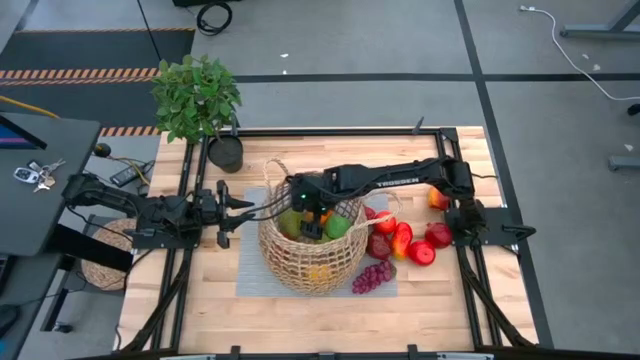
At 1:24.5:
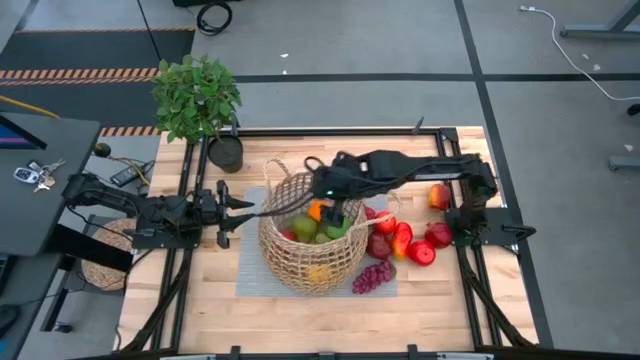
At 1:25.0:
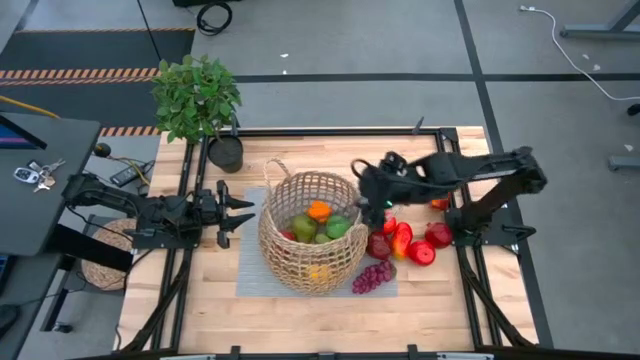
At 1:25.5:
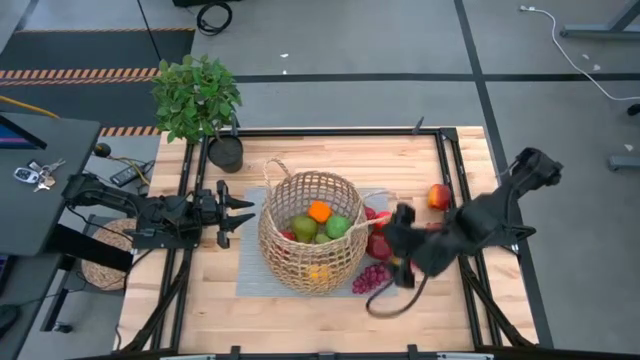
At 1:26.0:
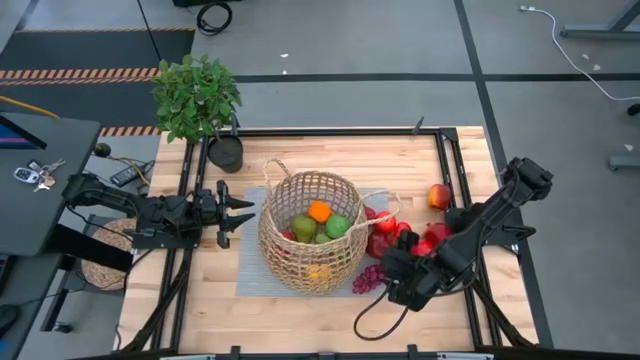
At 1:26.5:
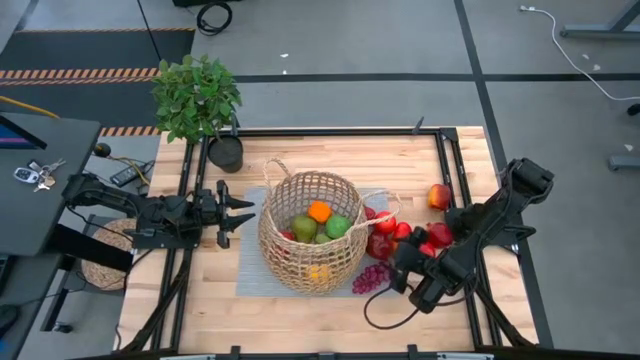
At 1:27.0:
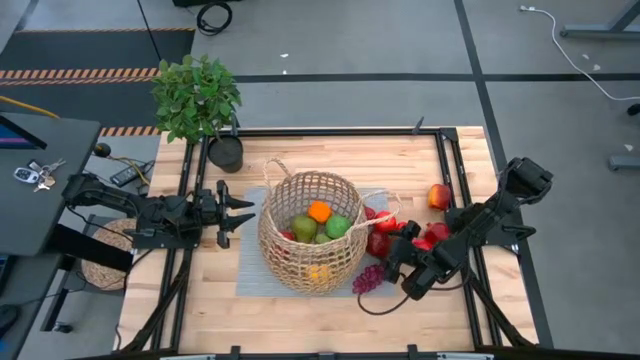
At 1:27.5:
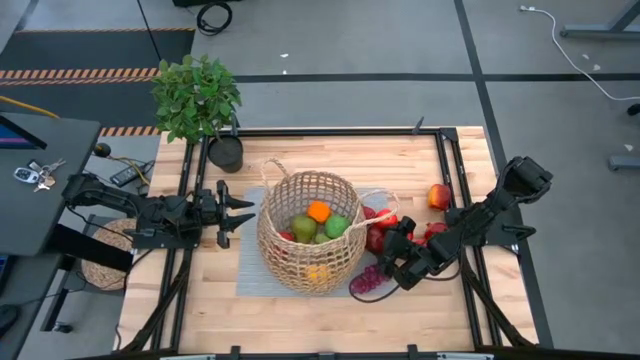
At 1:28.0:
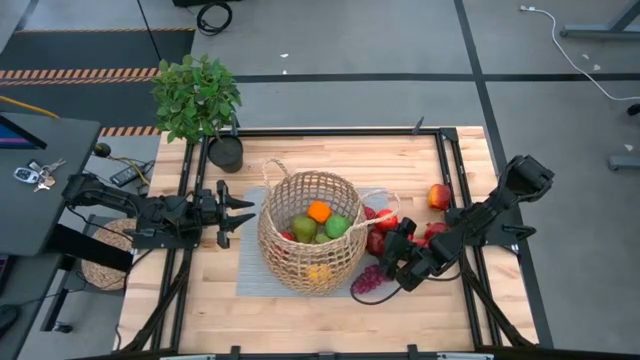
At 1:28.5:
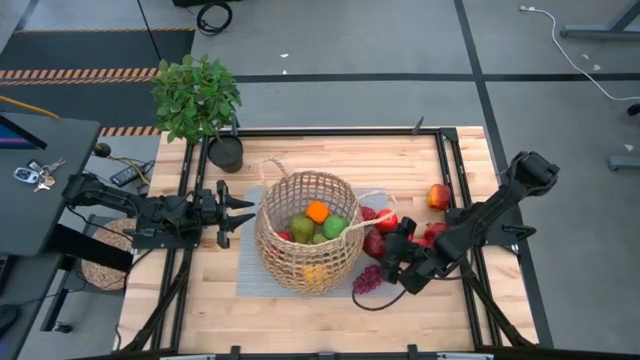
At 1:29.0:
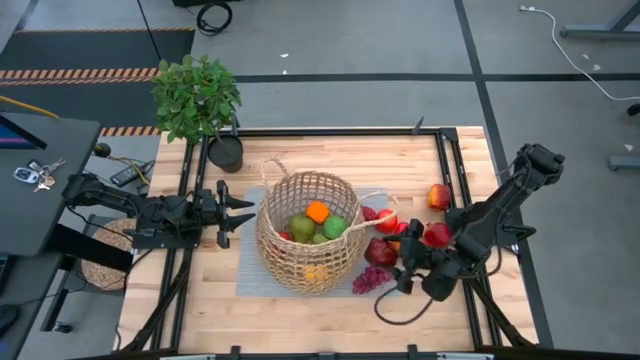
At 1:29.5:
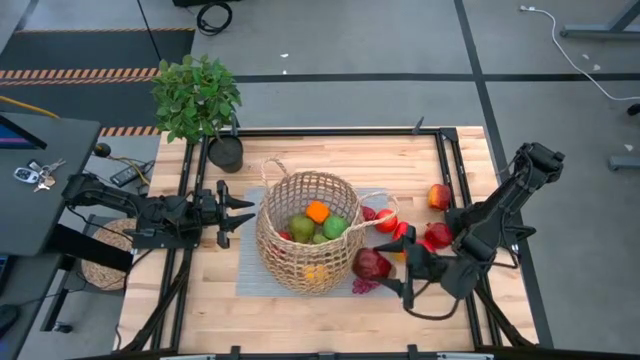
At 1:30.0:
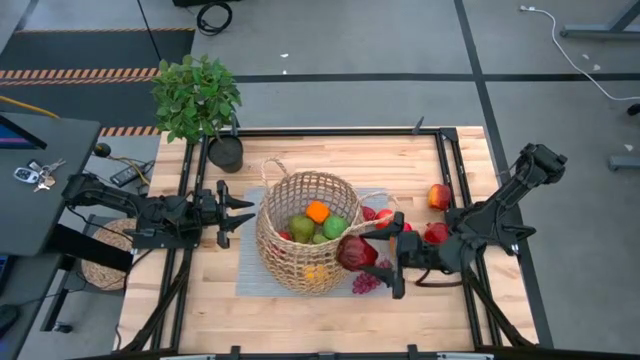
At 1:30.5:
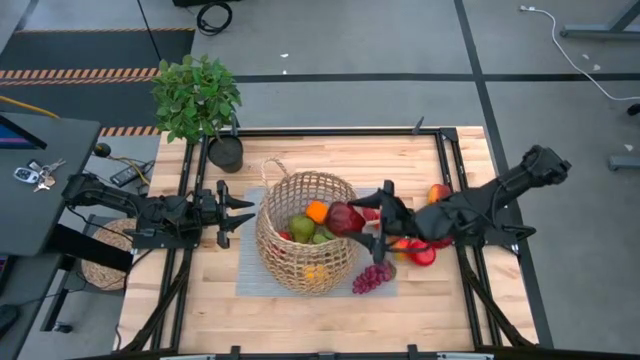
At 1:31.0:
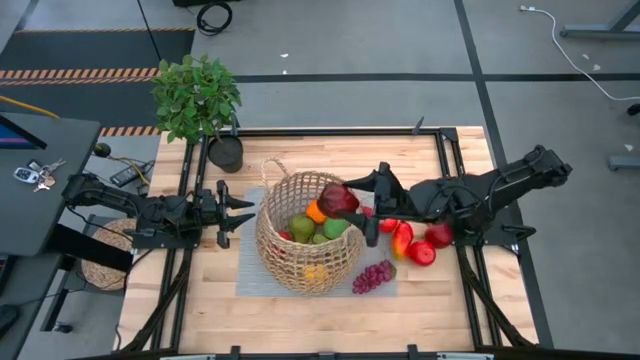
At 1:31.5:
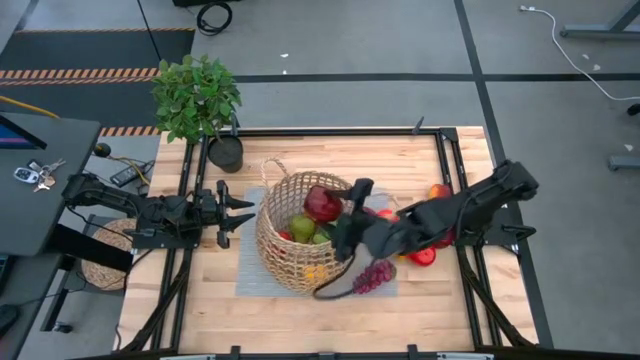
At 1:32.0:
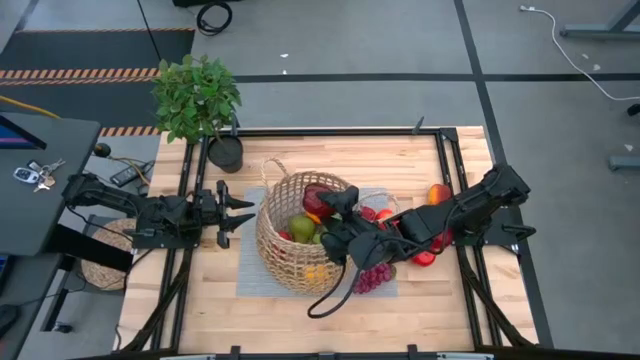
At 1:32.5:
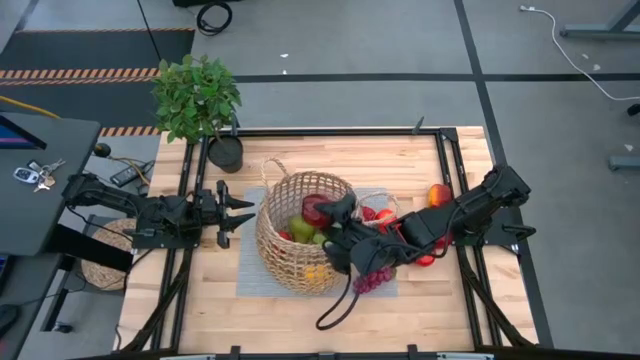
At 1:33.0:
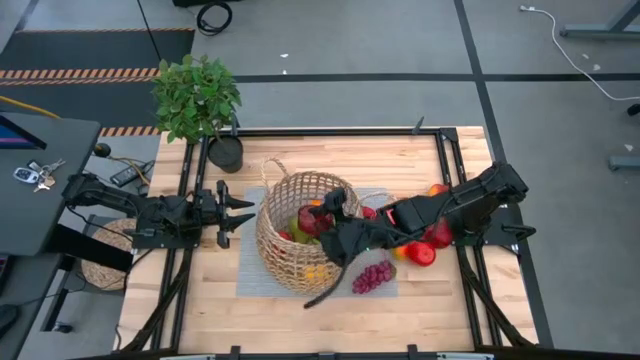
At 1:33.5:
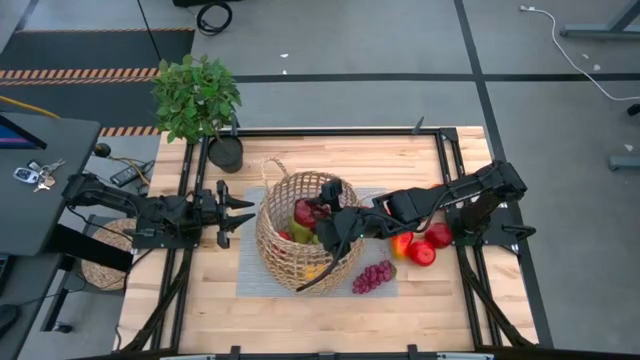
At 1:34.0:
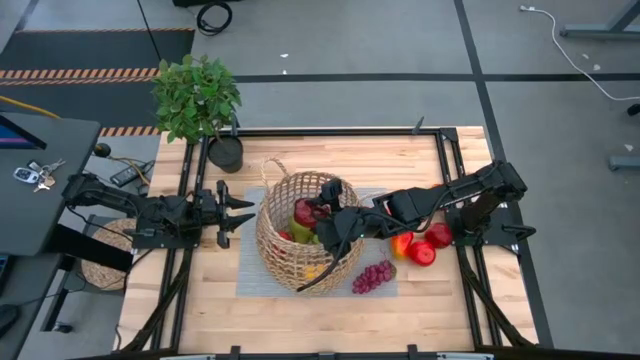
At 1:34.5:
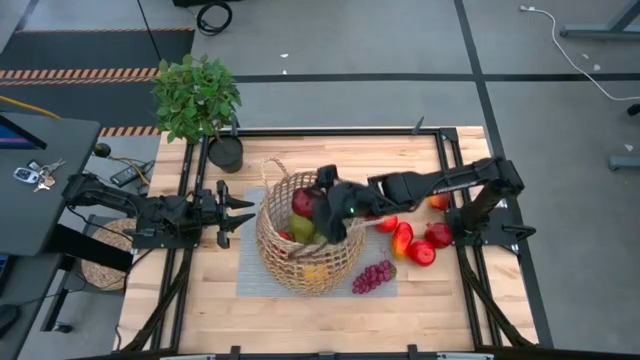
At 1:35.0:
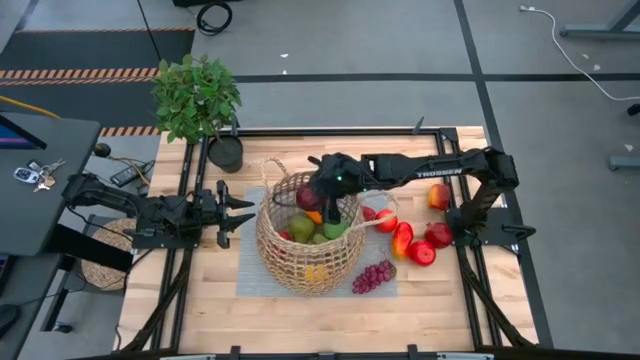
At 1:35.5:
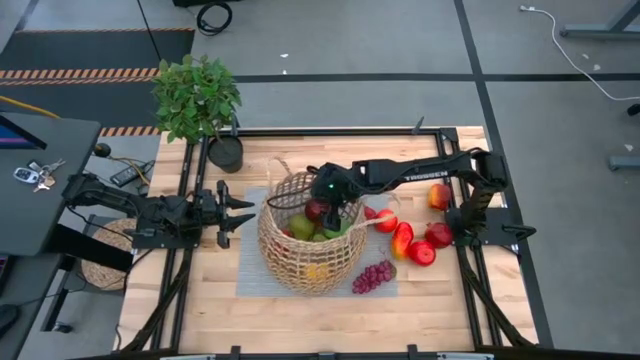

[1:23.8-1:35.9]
Task: Build produce basket
Put the bottom dark red apple into the basket

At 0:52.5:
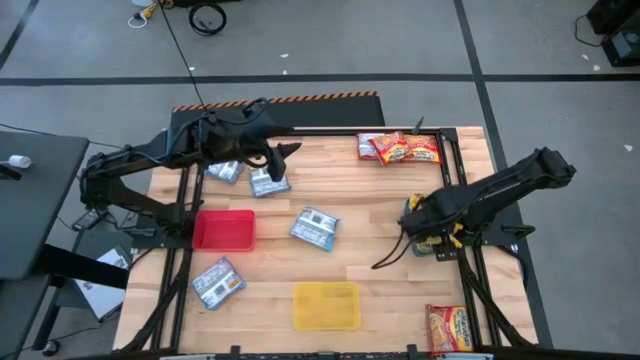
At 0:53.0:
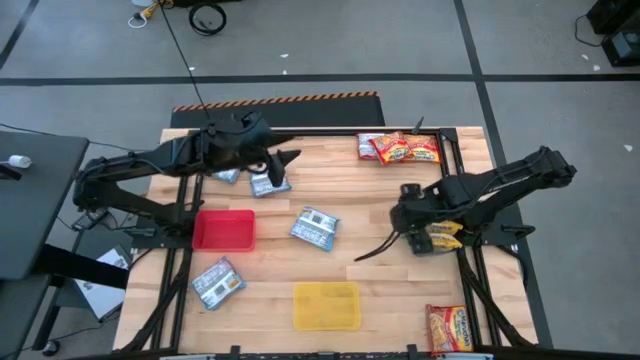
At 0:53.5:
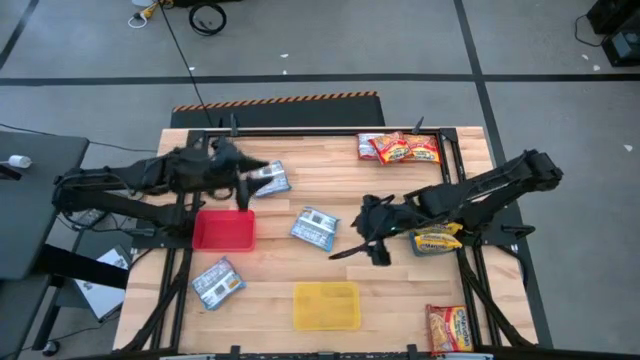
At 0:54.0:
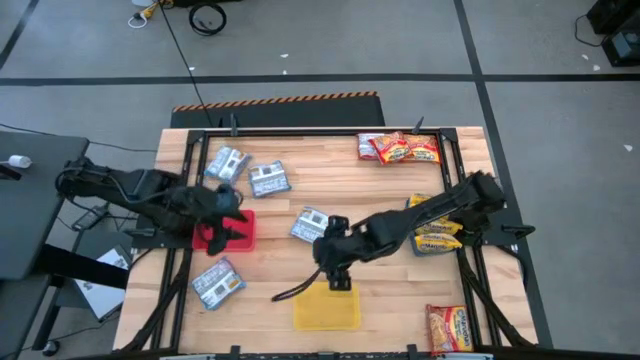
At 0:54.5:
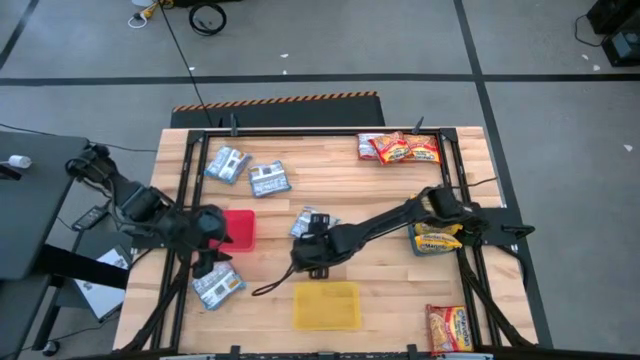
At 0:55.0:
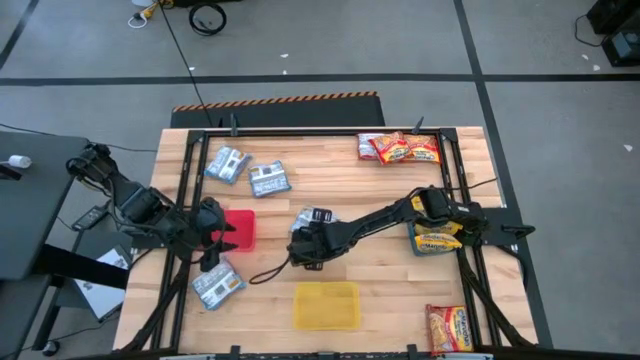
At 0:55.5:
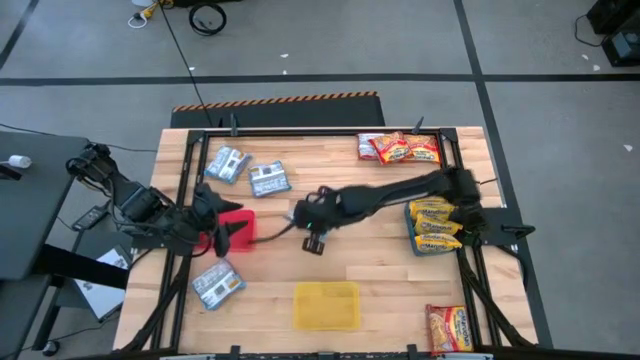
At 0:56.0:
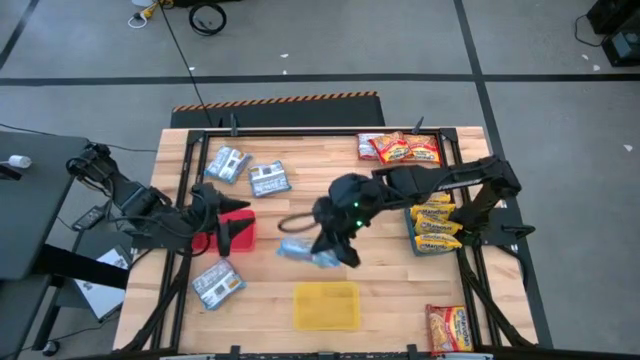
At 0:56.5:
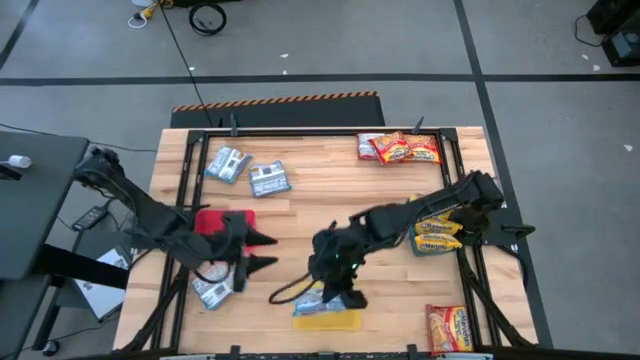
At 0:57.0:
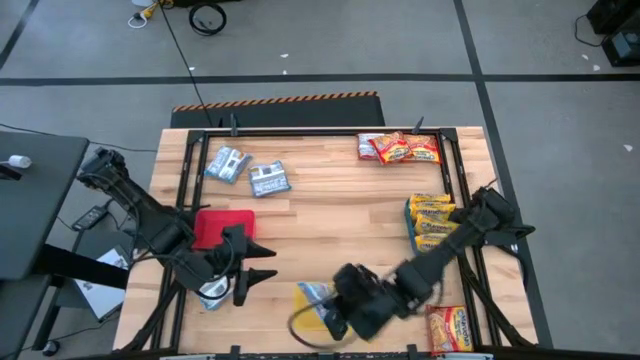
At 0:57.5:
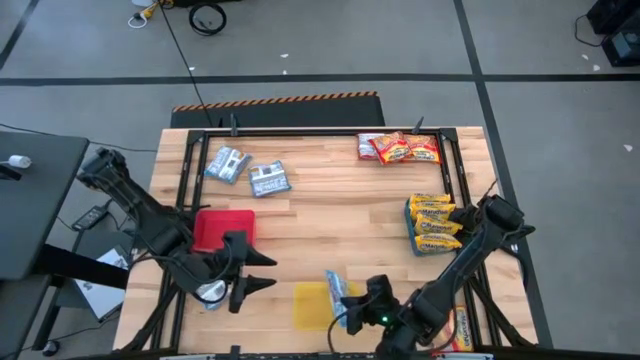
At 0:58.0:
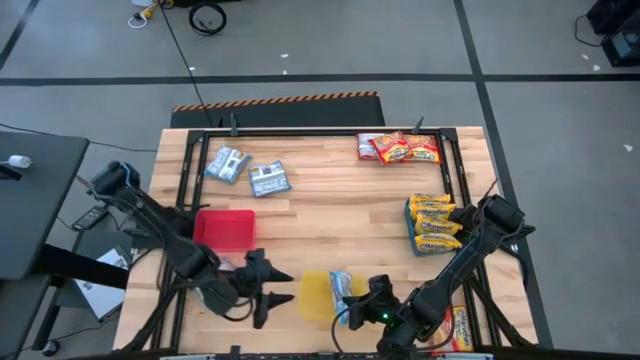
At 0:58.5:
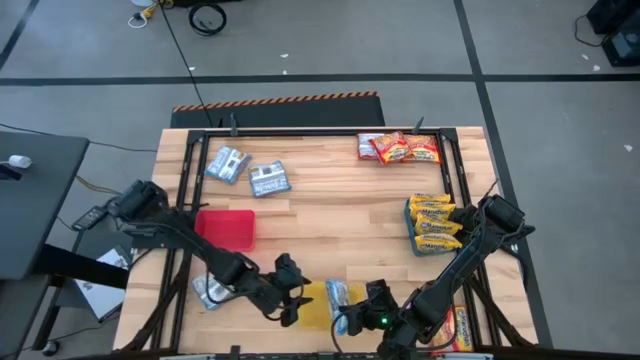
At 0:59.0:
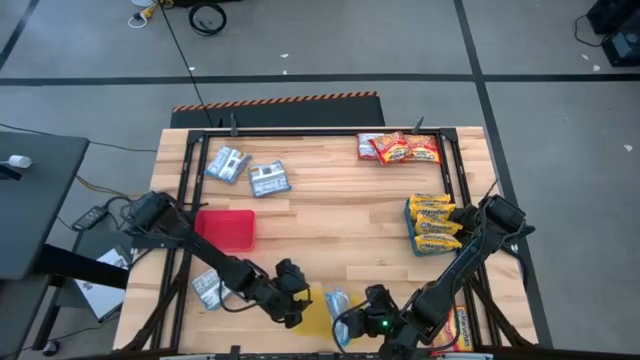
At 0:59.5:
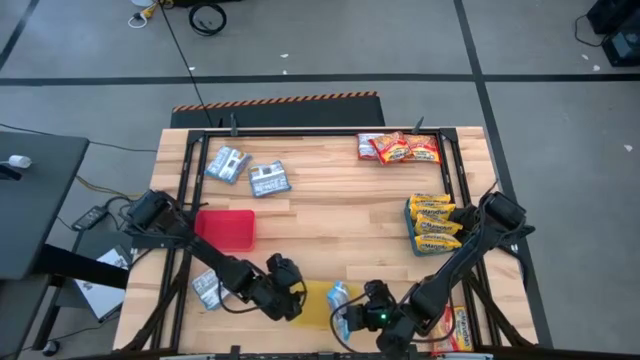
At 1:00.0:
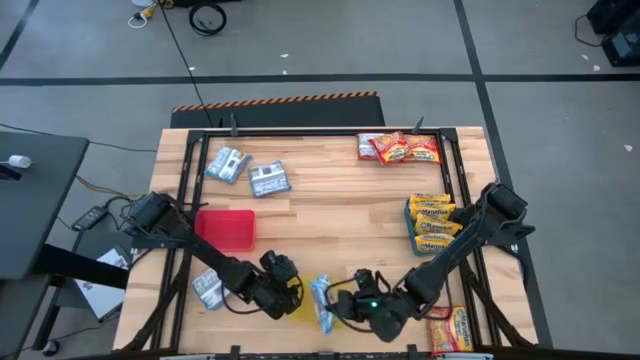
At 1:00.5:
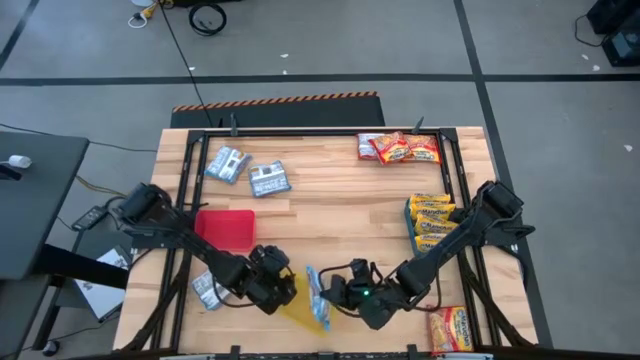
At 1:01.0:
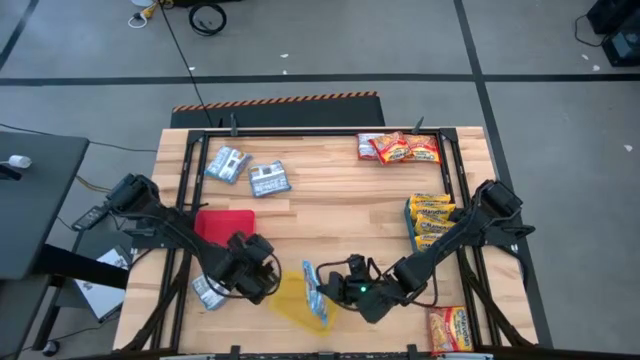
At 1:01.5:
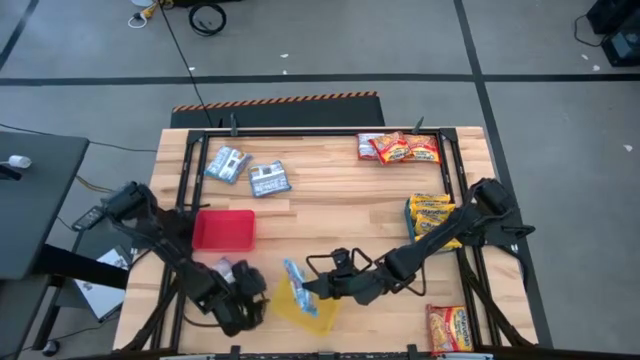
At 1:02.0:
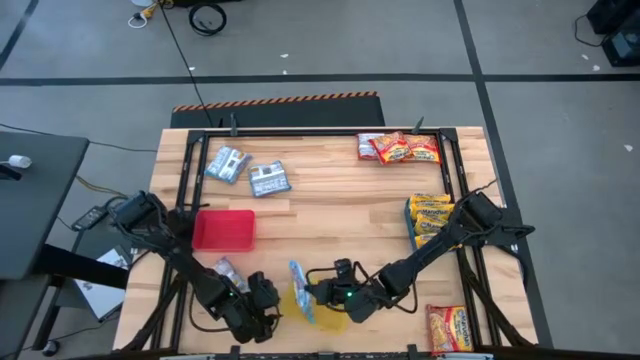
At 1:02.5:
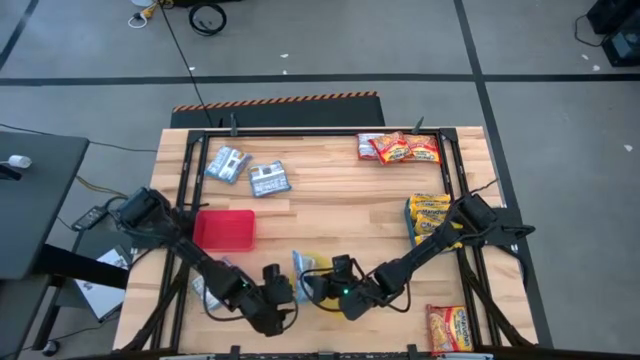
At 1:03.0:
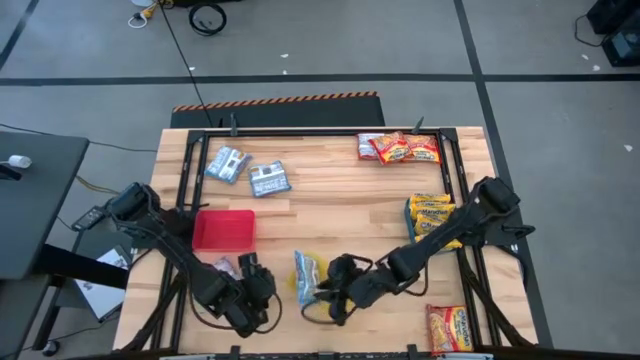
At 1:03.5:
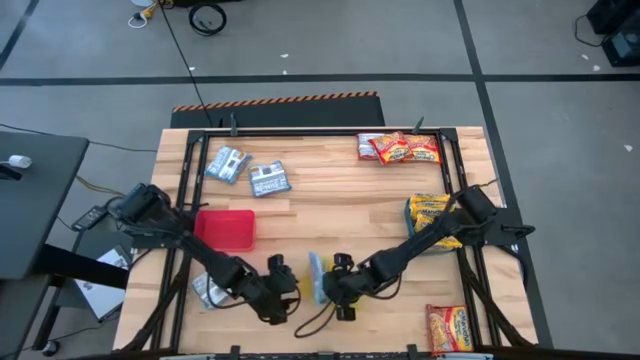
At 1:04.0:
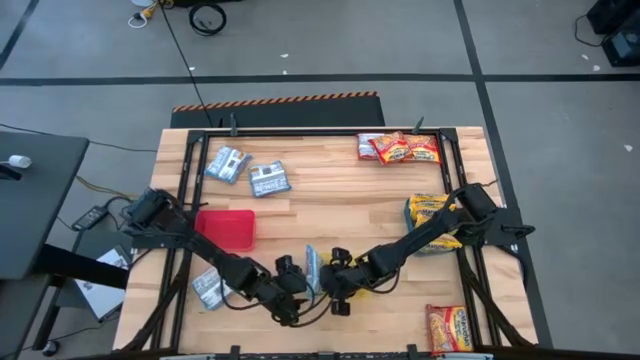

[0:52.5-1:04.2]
Task: Sort Maruchan noodles
Put the light blue noodle pack into the yellow bin
